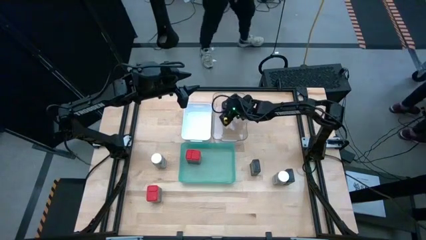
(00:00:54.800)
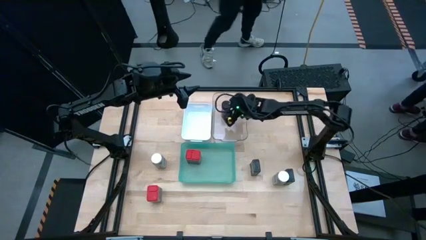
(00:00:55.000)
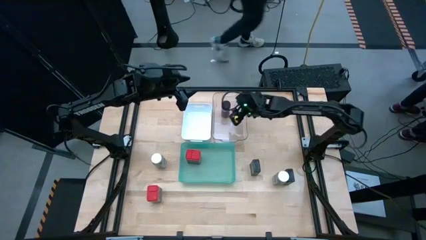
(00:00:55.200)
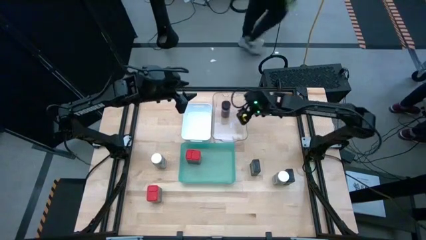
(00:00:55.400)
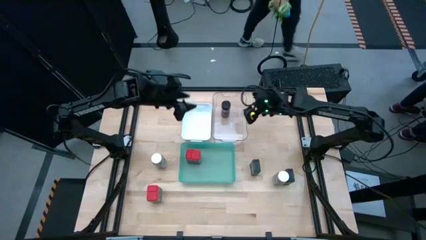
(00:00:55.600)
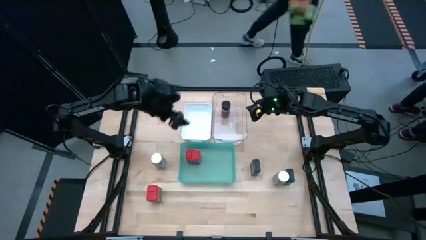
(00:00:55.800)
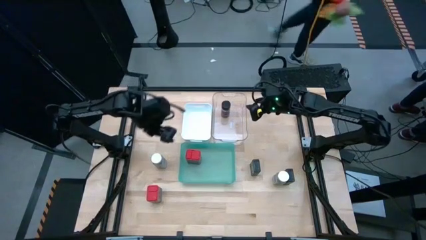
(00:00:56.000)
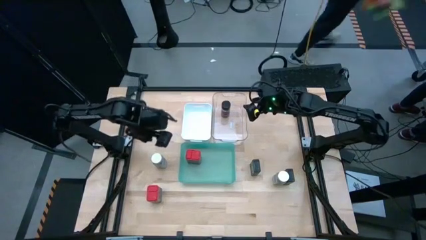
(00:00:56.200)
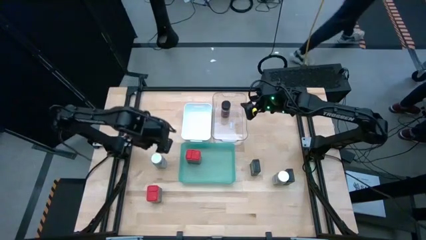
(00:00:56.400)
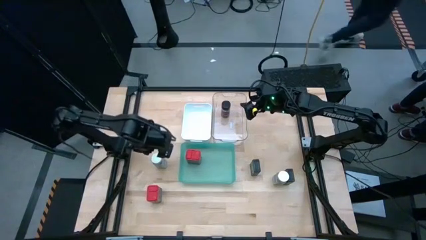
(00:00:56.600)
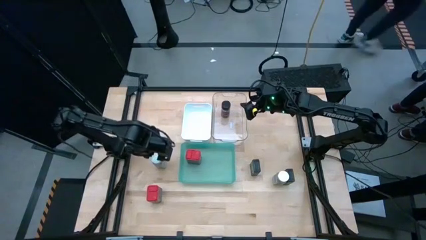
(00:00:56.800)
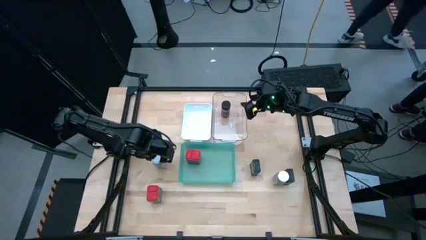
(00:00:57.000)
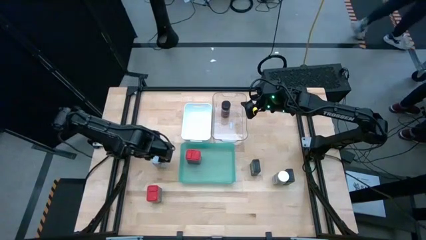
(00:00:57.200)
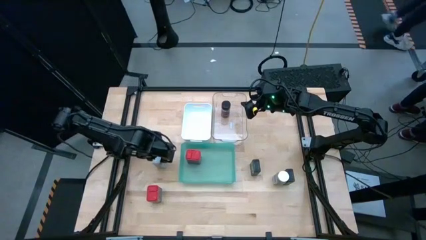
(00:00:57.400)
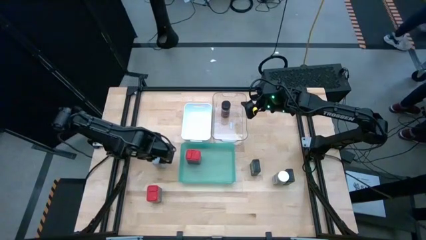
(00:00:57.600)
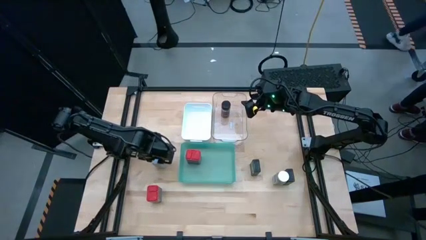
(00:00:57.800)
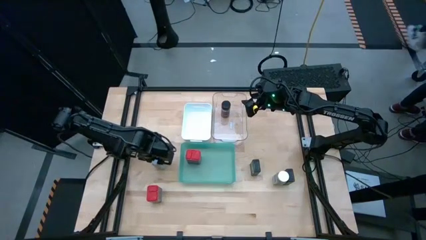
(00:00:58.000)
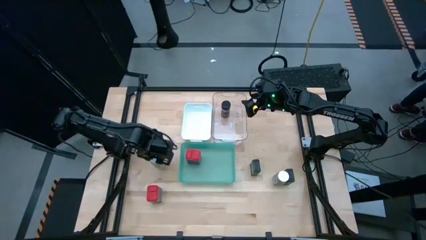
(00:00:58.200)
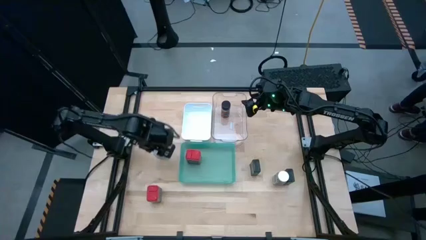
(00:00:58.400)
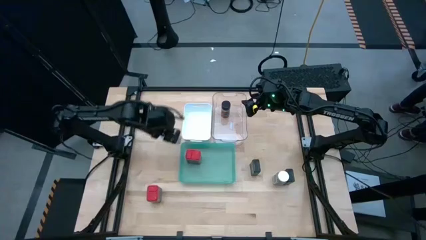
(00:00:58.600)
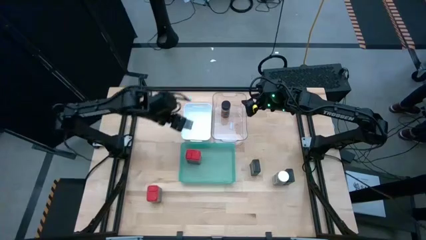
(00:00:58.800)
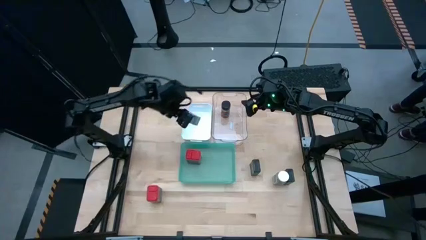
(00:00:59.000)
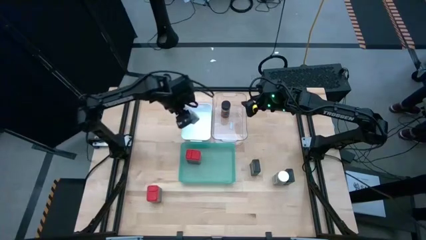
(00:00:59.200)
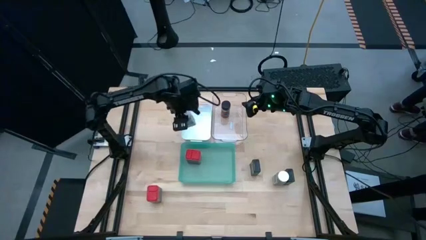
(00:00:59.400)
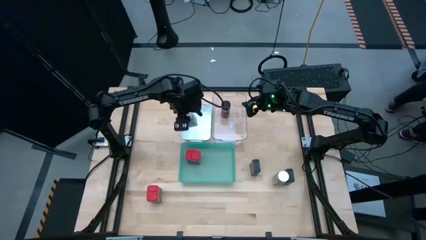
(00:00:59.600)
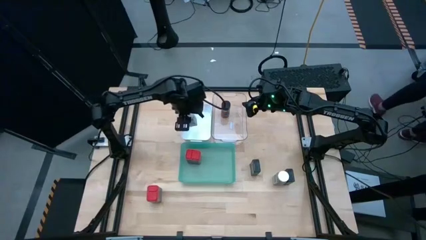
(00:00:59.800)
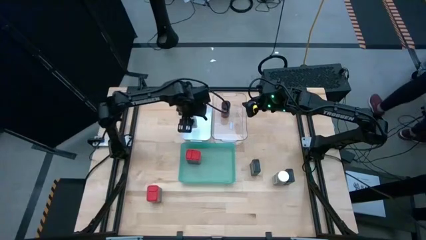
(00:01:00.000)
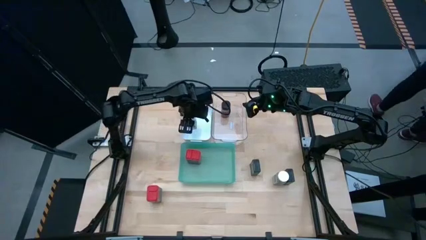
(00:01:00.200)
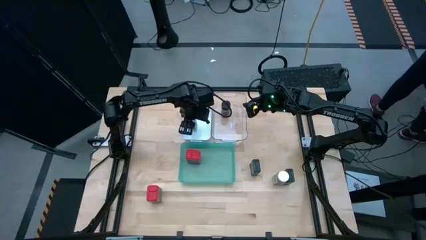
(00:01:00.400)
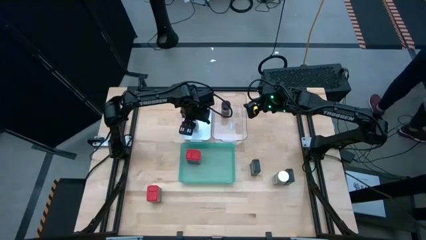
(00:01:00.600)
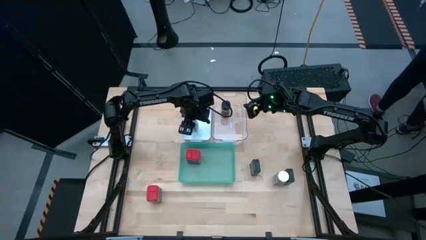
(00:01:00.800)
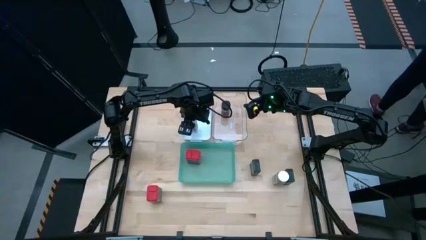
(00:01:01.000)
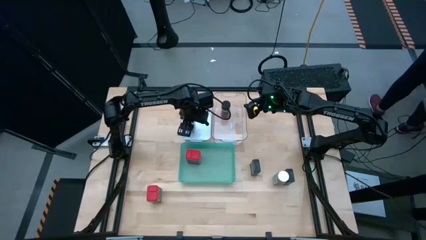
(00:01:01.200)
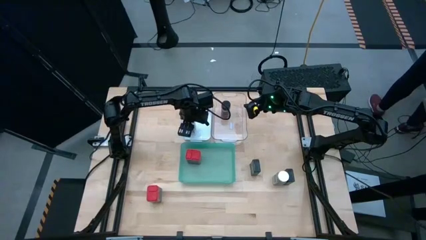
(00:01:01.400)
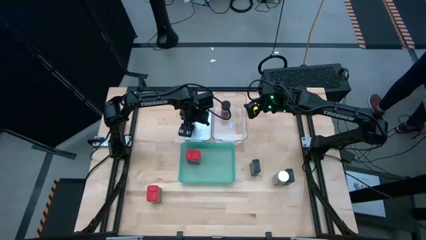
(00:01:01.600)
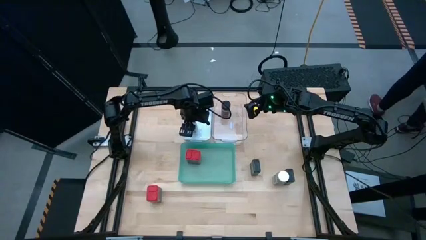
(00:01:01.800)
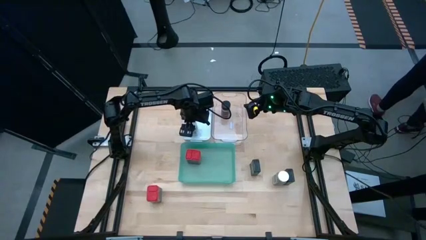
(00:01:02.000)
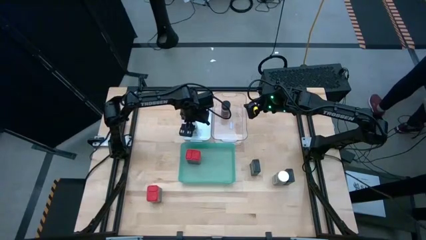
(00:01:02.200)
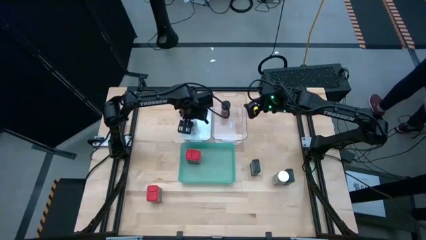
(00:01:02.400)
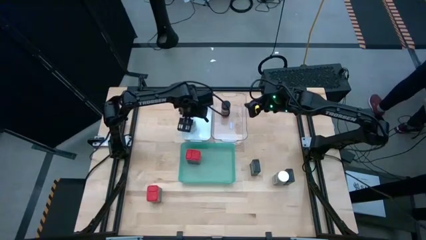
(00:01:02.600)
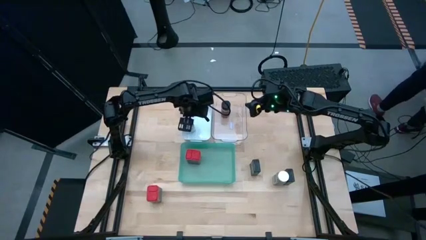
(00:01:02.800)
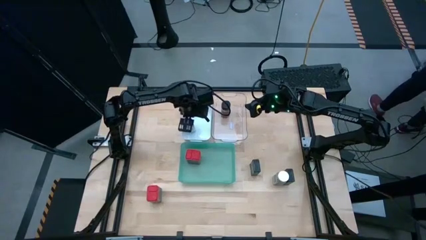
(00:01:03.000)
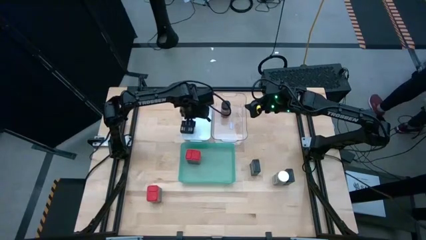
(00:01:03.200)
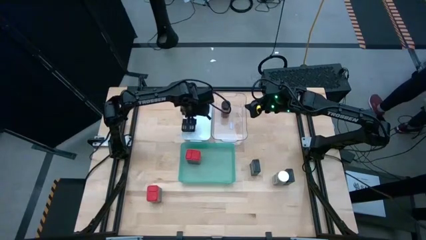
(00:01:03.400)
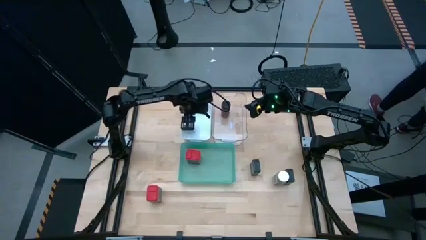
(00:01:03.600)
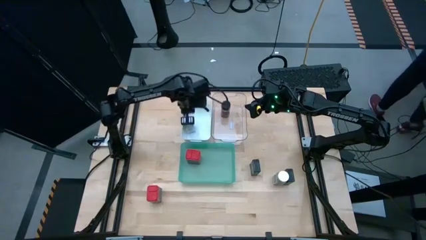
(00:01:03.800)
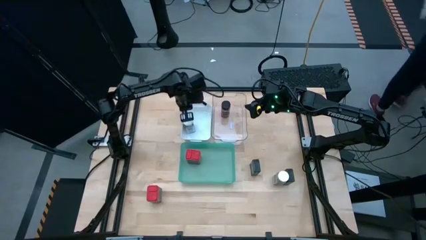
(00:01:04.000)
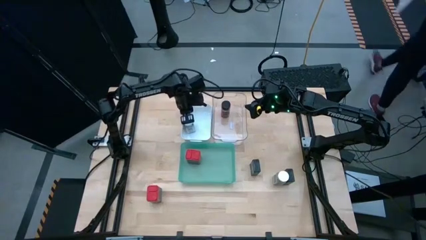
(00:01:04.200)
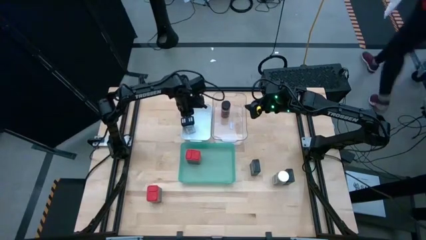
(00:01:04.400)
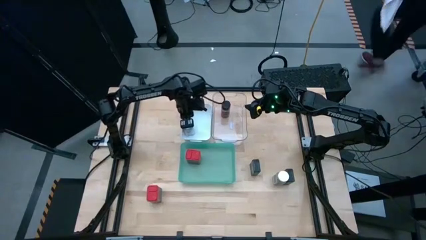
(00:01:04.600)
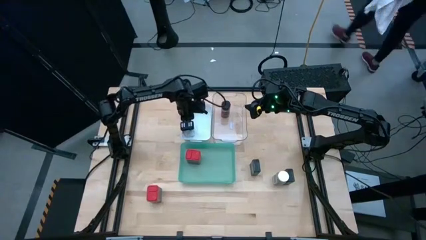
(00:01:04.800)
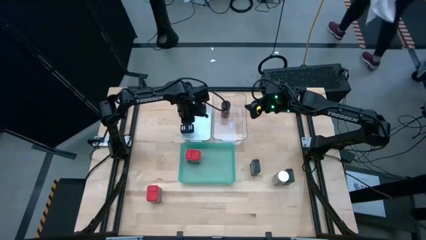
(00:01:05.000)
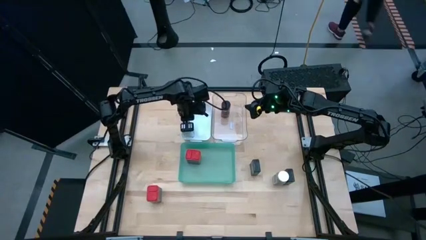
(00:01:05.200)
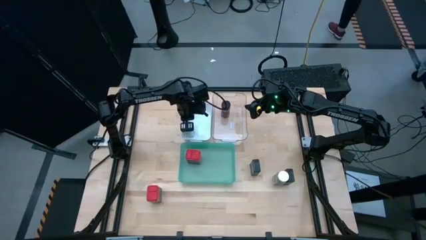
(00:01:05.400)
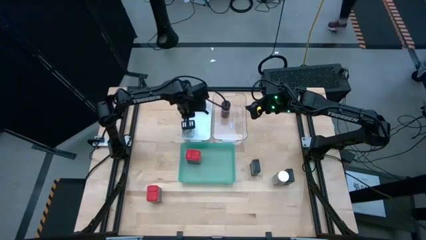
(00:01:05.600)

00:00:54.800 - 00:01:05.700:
Task: Sort spices by type
Put the left white spice bottle into the white bin

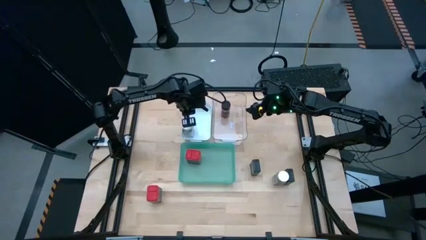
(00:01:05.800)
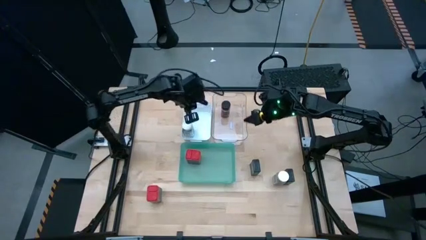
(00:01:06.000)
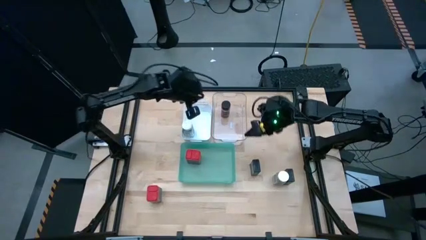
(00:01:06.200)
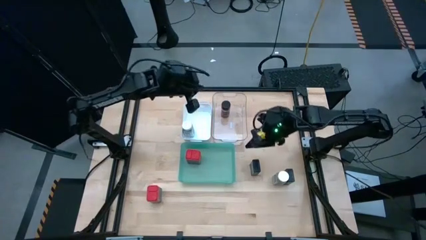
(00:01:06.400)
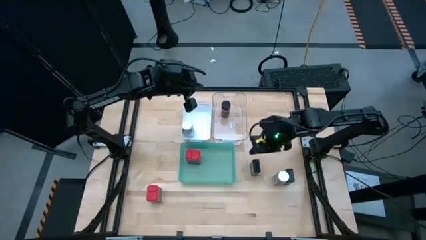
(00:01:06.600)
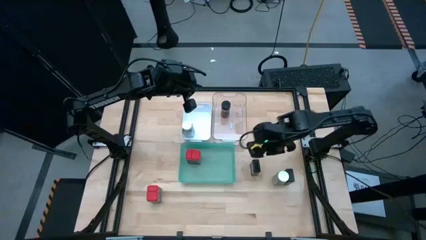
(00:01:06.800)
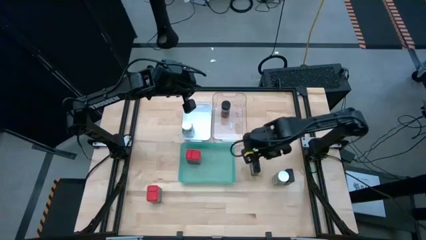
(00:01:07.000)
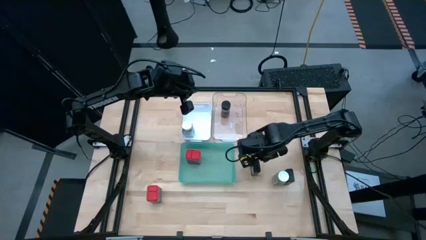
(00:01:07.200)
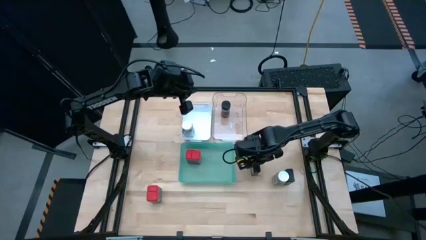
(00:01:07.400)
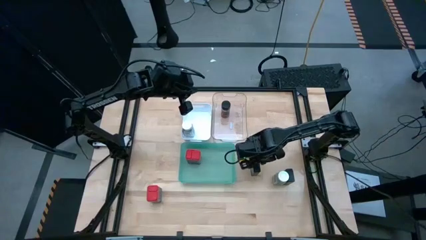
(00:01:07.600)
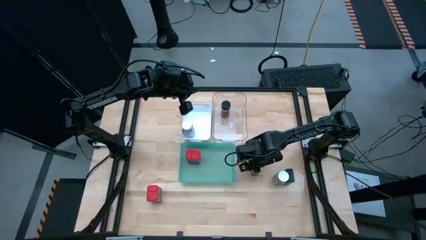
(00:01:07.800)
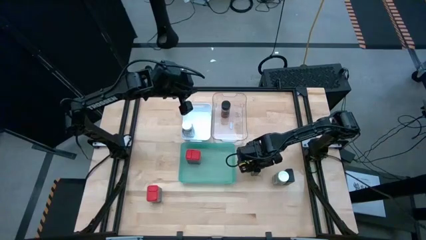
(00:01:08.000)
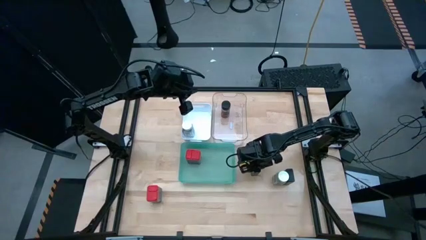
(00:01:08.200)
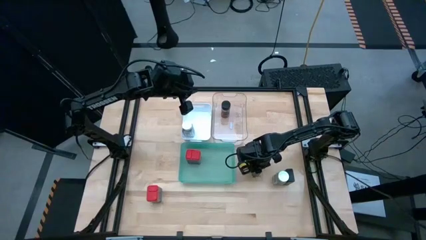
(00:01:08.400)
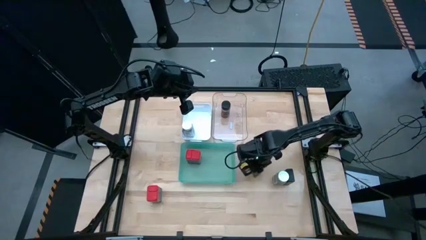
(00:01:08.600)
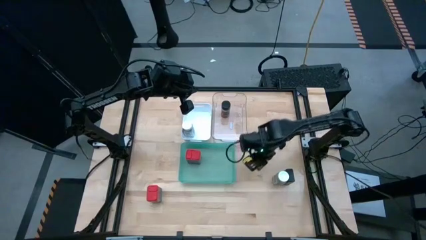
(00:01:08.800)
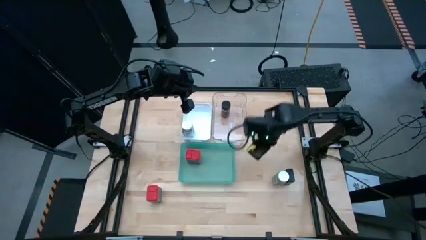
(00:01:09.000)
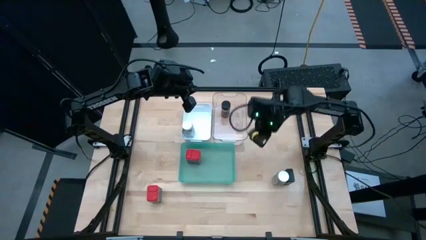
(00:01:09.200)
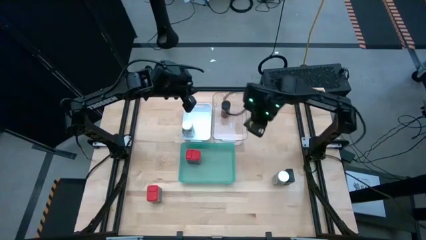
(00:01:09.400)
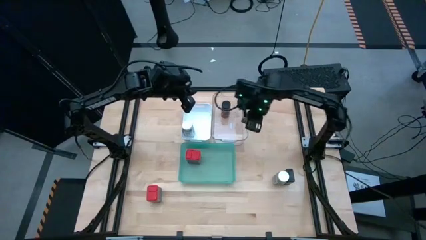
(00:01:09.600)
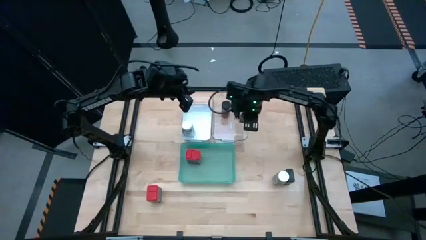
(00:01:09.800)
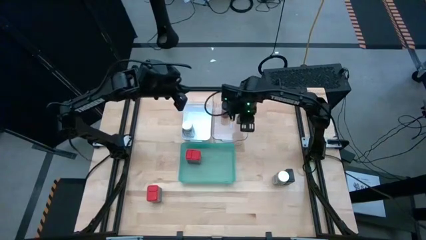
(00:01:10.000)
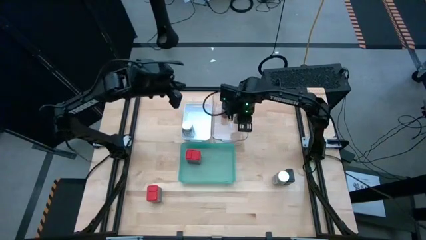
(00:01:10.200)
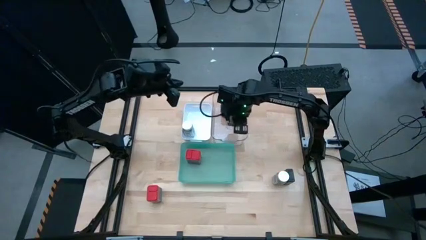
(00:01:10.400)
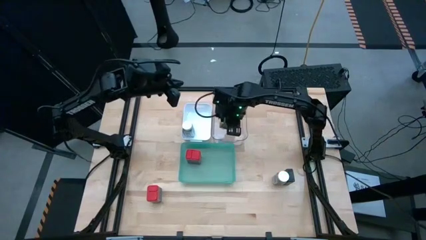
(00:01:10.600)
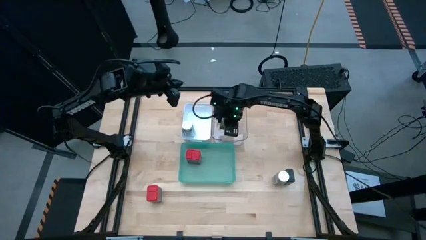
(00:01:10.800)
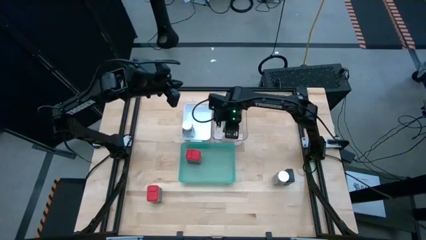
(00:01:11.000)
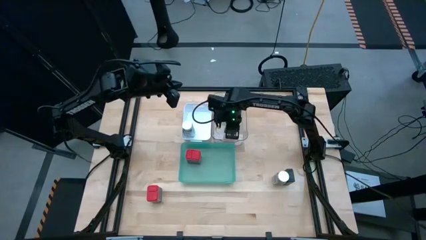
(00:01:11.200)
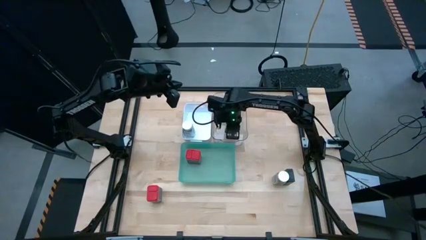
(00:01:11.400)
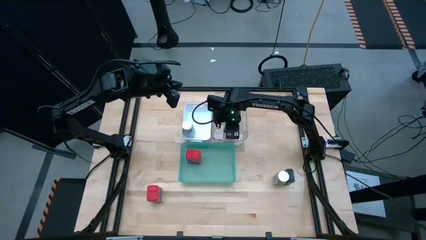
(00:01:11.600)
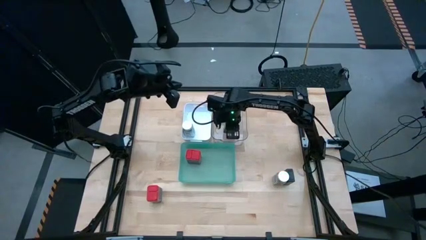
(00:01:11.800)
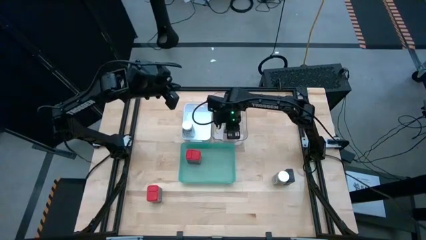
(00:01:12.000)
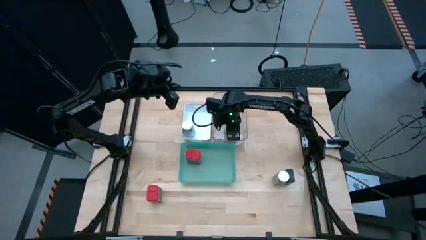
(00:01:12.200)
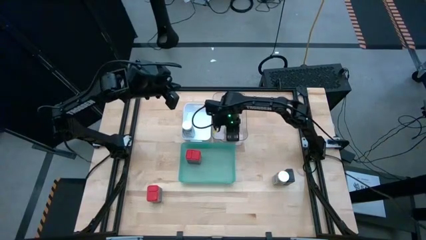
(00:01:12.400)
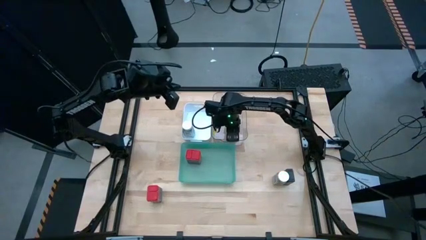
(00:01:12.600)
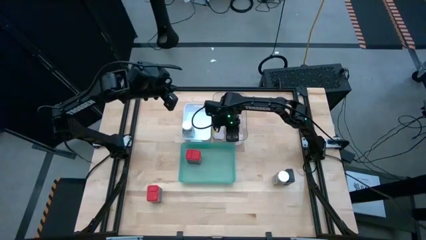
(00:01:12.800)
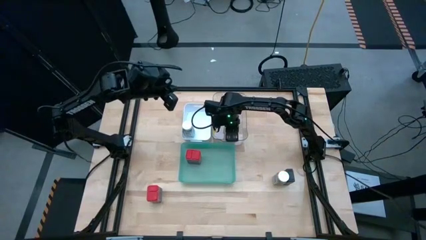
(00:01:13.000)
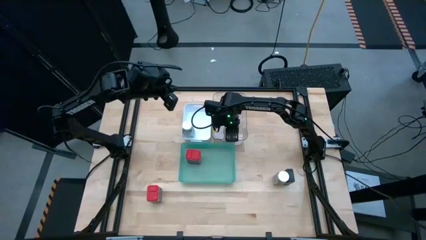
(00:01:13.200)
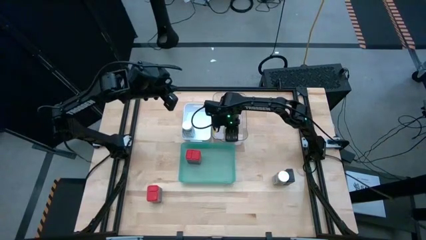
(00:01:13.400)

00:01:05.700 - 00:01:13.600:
Put the left black spice can into the transparent bin
